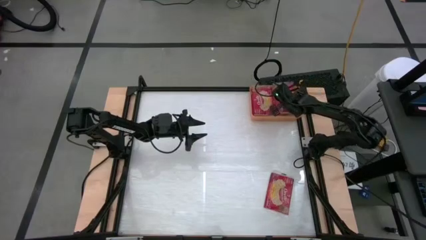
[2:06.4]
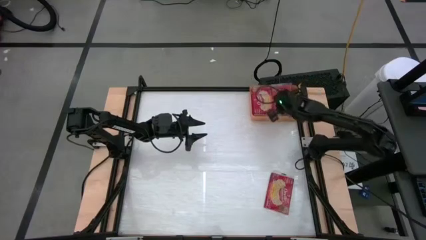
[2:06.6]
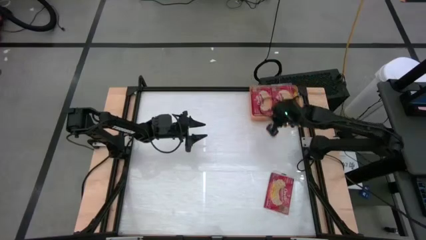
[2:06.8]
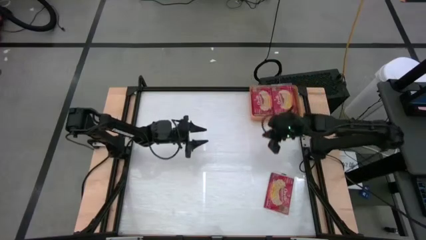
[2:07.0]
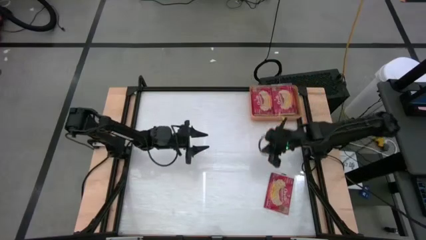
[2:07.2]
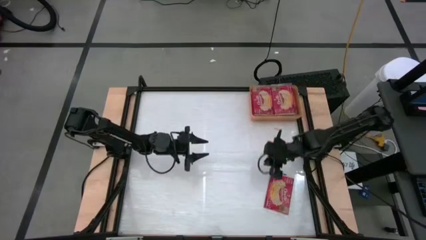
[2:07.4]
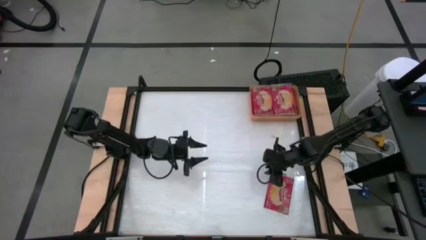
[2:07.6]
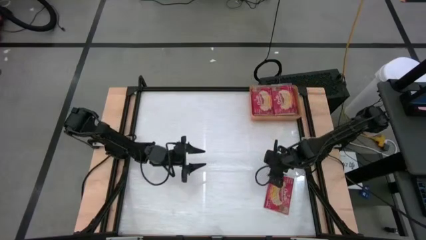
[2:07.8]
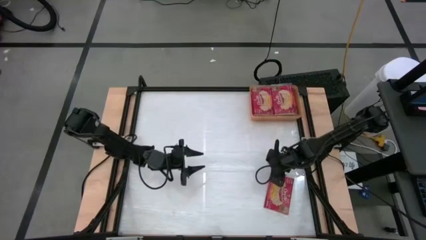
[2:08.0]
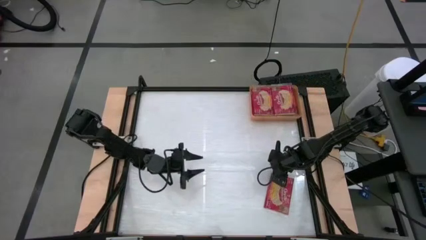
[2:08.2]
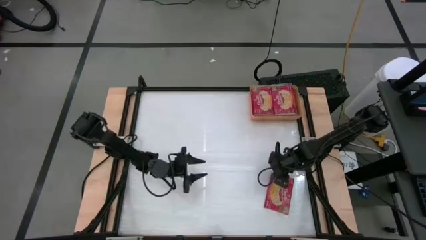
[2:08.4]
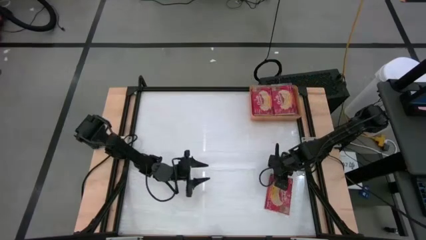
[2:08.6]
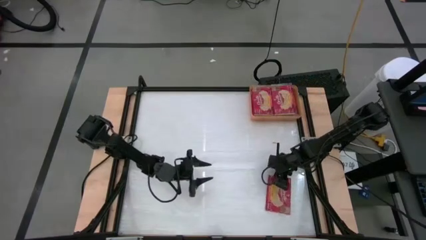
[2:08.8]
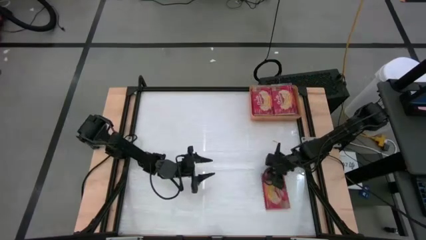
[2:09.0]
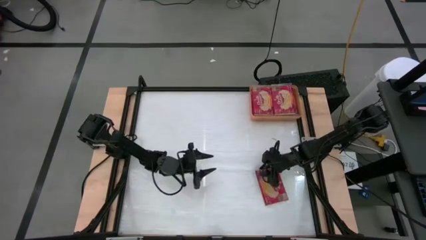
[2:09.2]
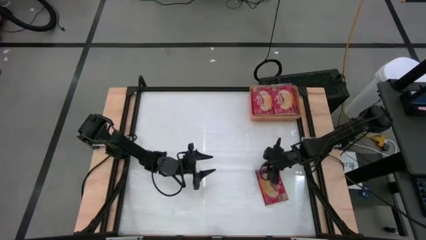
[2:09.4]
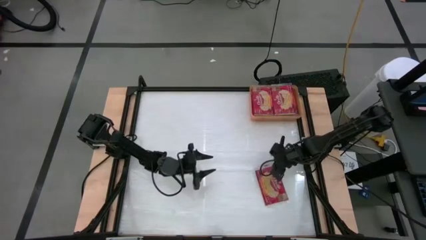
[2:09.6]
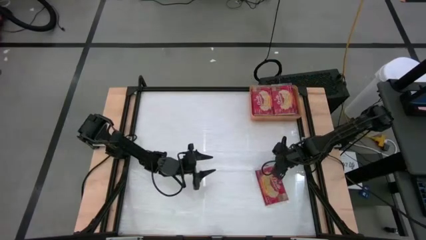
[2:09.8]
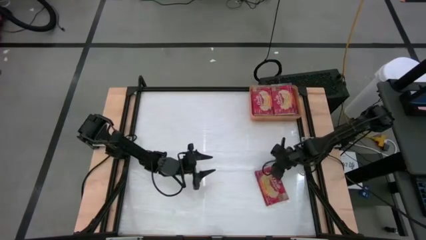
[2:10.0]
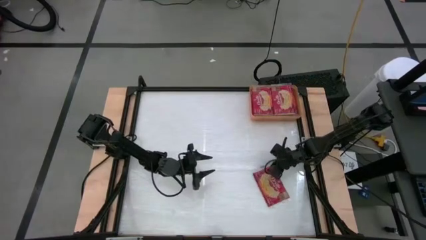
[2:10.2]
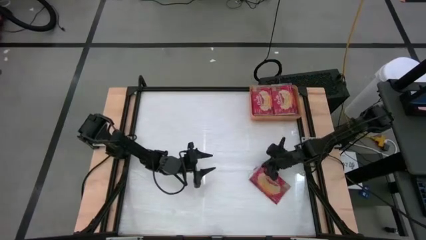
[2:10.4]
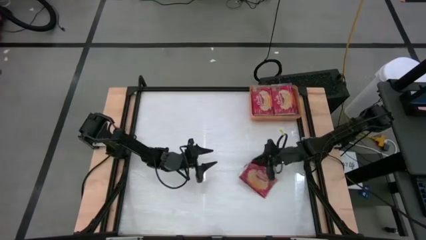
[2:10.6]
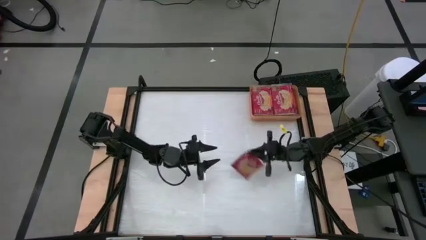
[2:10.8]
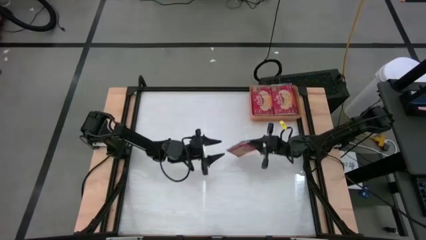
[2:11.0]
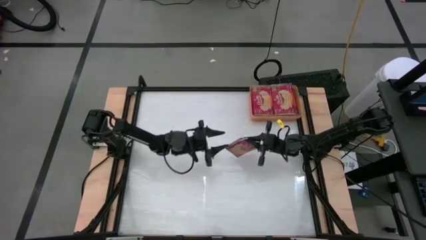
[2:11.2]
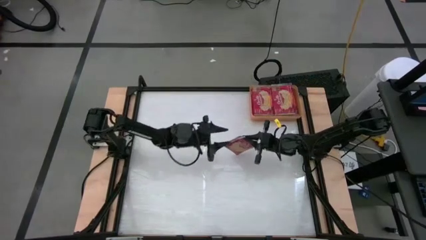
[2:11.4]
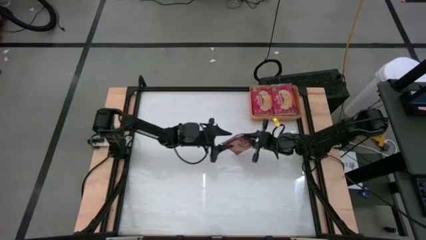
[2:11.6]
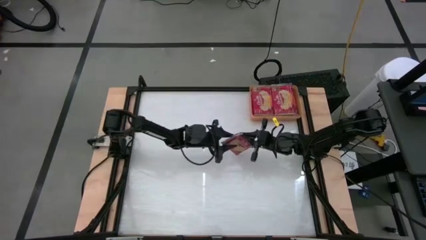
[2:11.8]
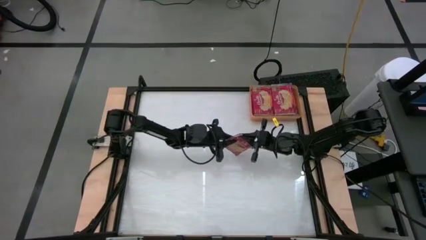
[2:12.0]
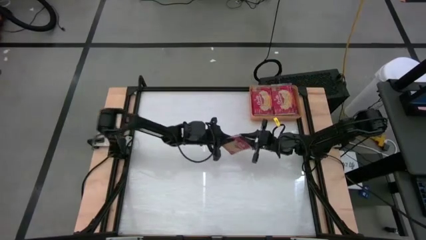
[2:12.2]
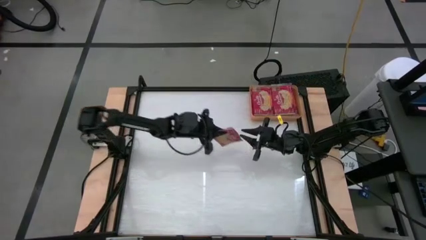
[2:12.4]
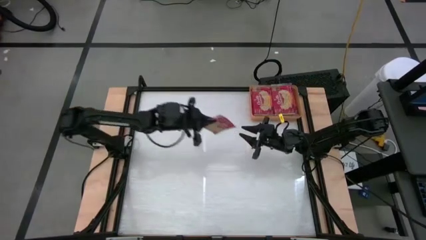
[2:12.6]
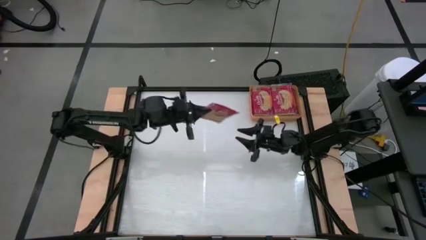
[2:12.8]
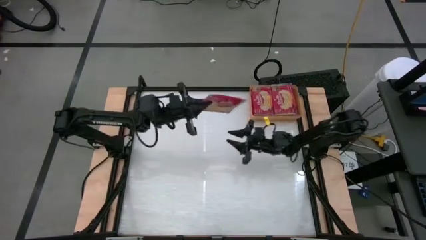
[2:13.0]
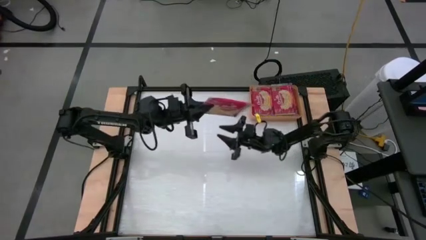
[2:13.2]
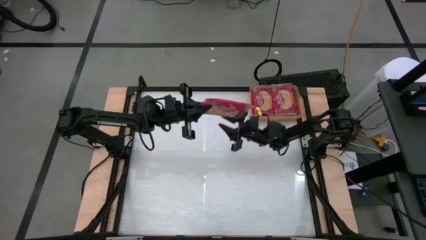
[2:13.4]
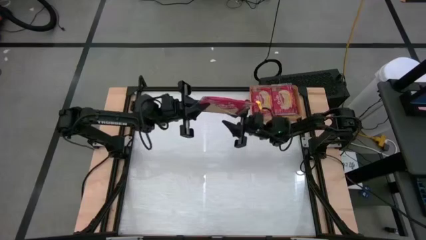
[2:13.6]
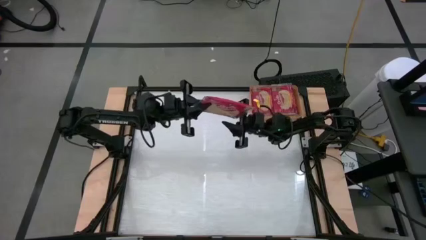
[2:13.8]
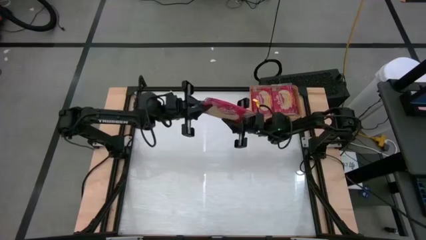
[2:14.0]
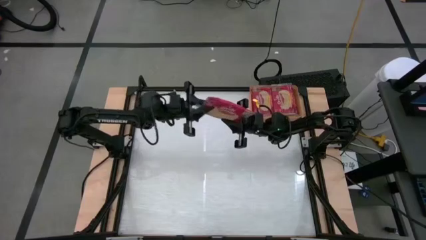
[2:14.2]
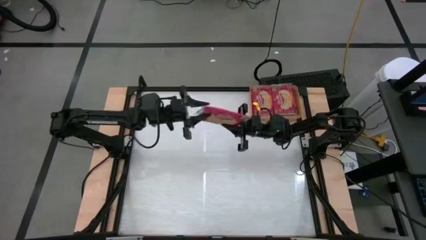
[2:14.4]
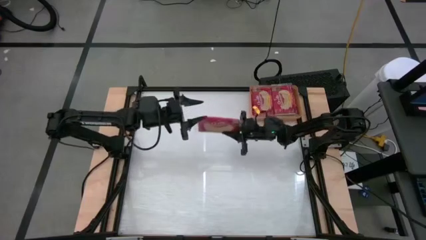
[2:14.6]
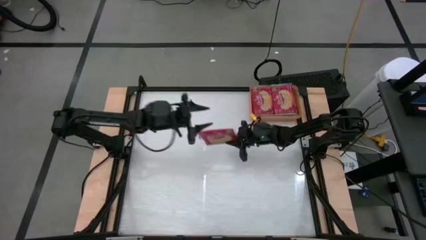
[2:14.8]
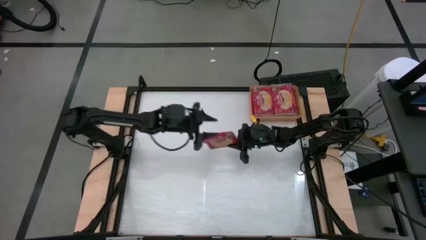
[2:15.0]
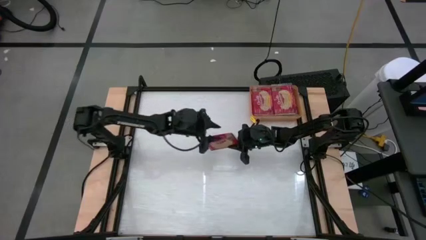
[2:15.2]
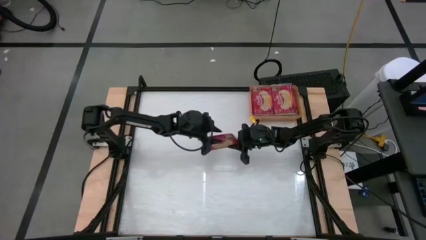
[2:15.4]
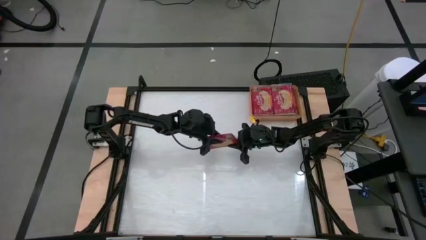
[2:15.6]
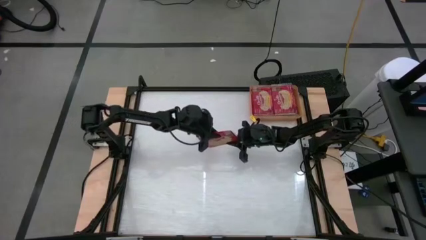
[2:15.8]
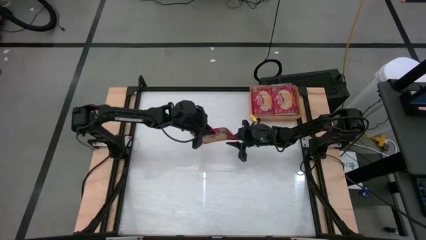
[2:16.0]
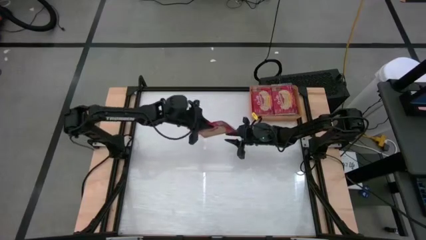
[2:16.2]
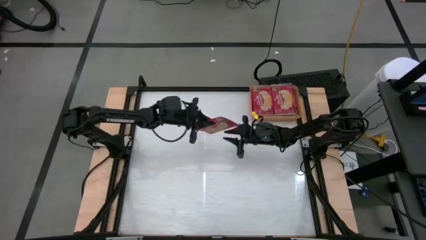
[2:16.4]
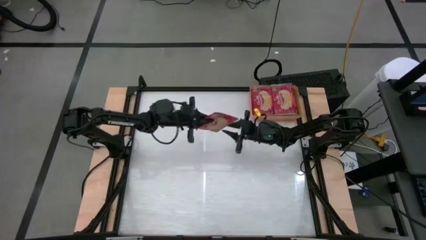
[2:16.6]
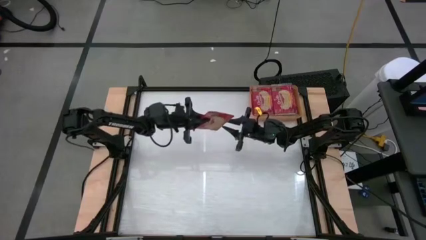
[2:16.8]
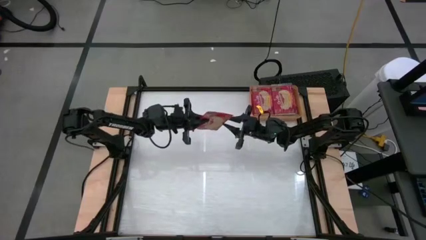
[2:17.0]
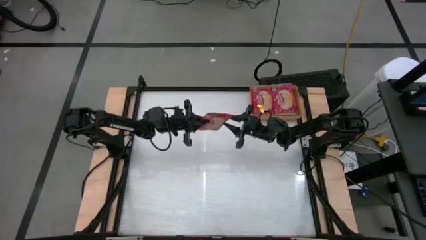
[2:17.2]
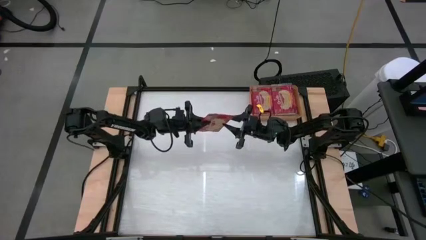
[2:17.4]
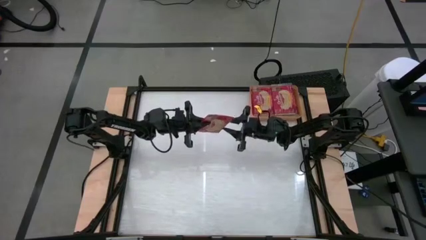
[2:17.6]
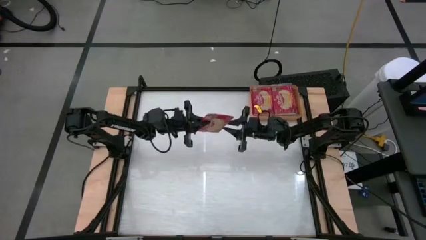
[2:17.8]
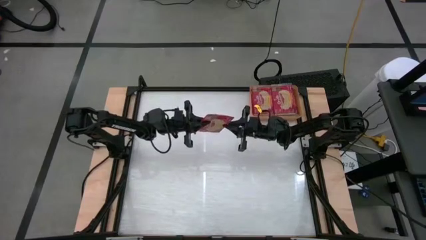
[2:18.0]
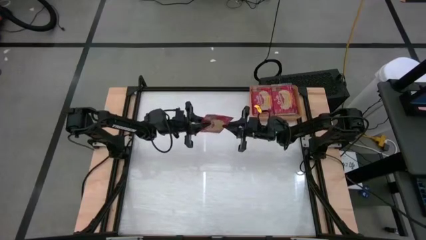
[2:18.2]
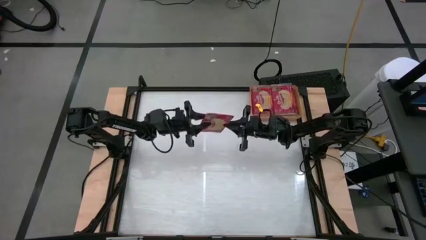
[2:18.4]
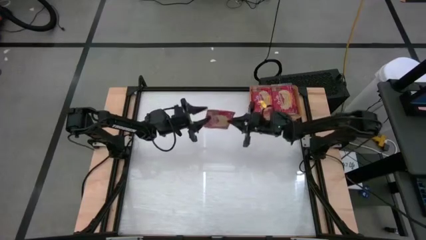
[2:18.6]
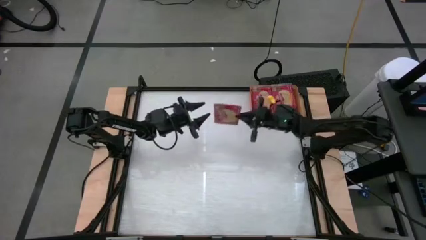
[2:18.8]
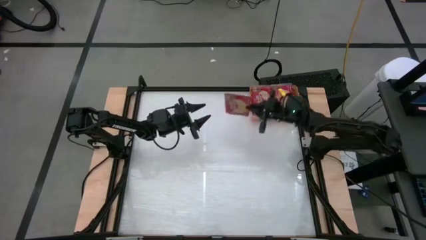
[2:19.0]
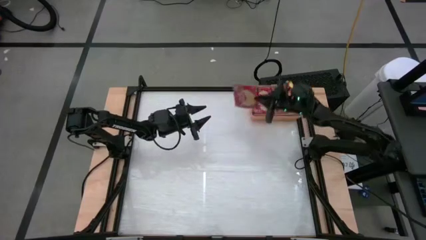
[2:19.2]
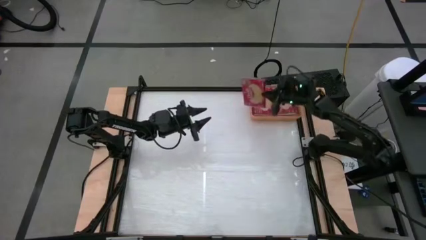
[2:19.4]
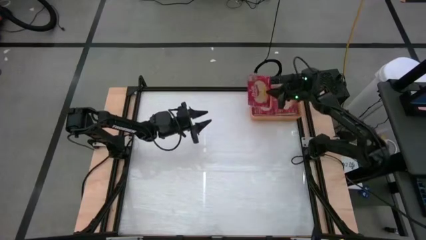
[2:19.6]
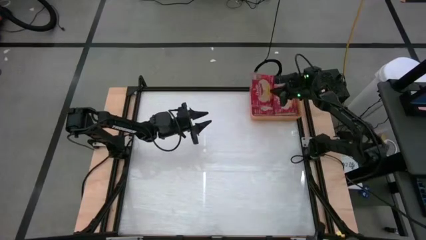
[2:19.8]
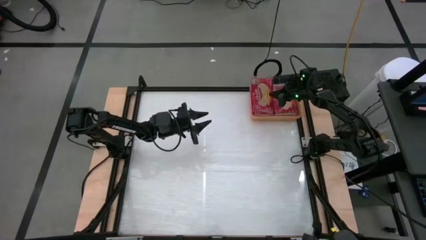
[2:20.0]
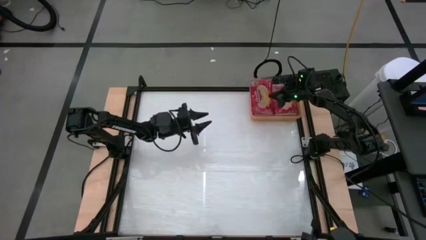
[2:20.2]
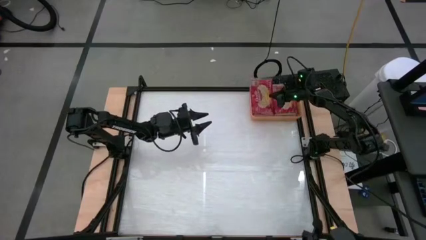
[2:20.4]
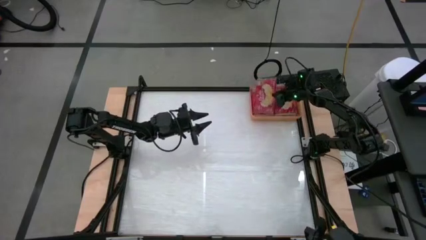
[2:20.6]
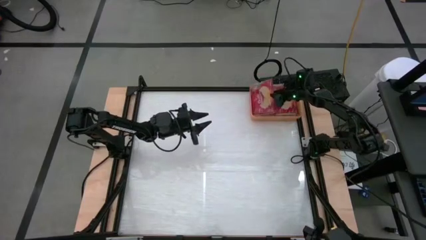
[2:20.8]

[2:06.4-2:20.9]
Task: Sort popcorn bags into baskets
Put the red popcorn bag into the orange bin
